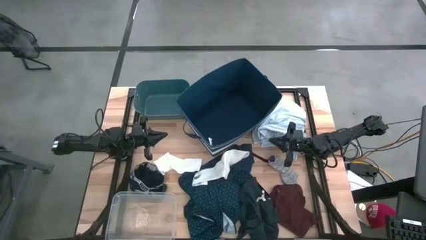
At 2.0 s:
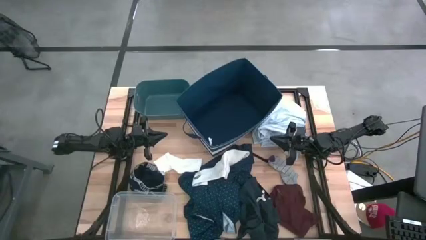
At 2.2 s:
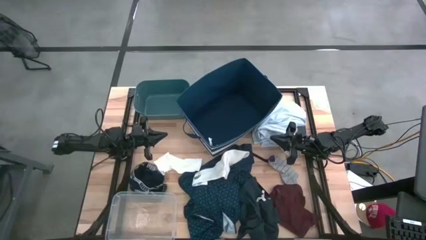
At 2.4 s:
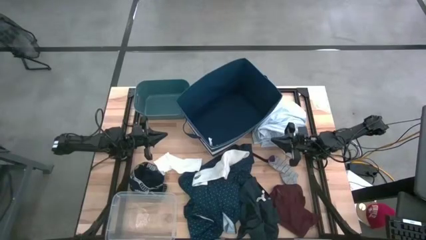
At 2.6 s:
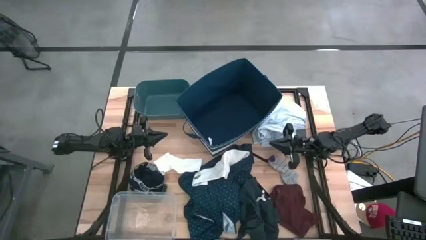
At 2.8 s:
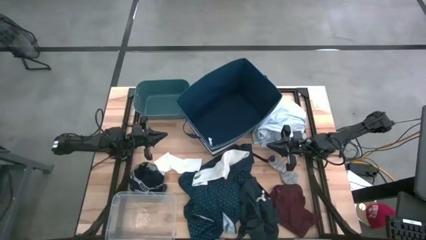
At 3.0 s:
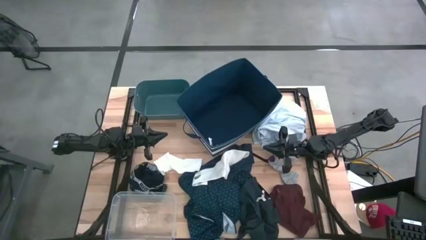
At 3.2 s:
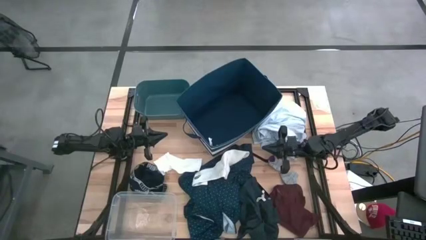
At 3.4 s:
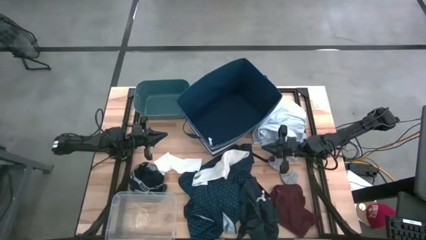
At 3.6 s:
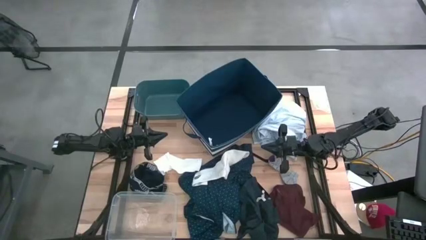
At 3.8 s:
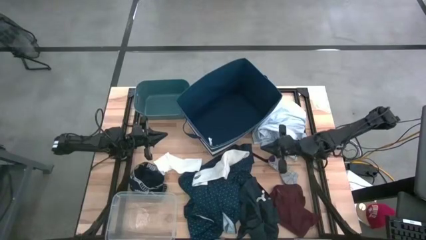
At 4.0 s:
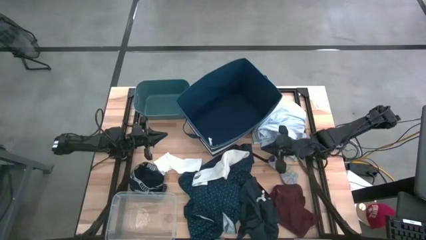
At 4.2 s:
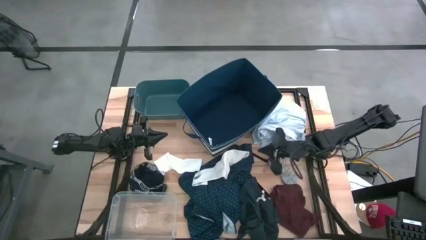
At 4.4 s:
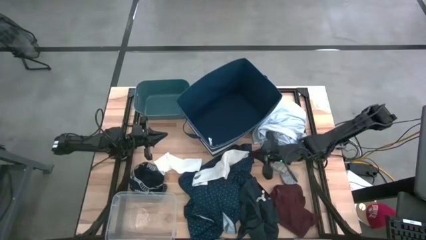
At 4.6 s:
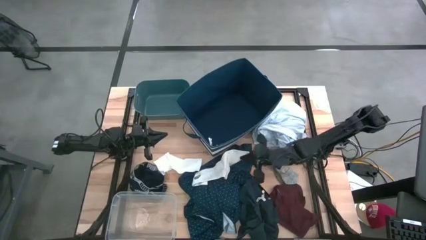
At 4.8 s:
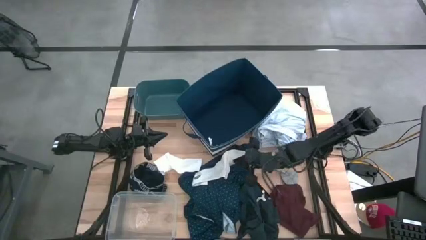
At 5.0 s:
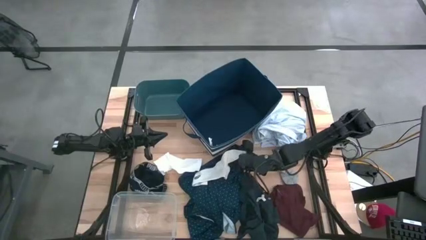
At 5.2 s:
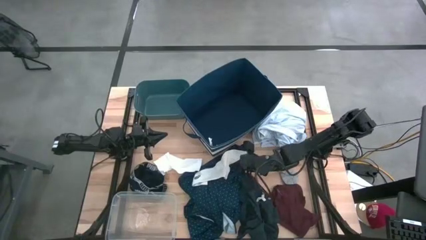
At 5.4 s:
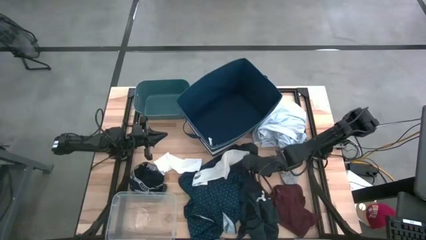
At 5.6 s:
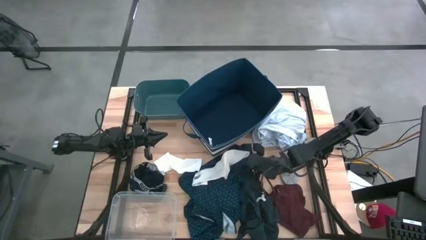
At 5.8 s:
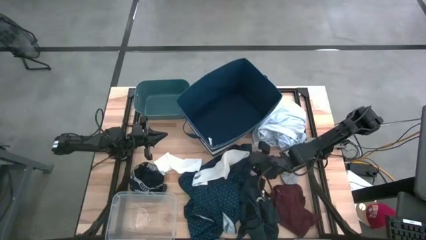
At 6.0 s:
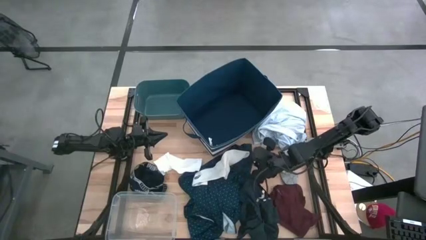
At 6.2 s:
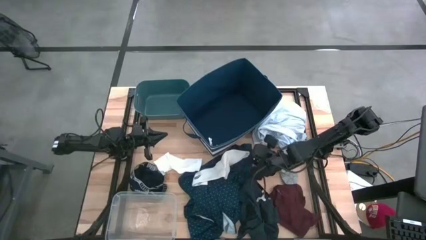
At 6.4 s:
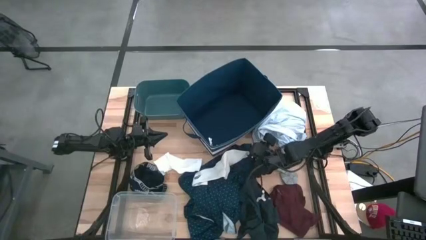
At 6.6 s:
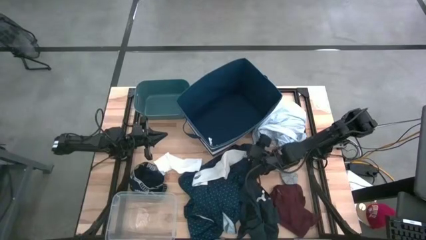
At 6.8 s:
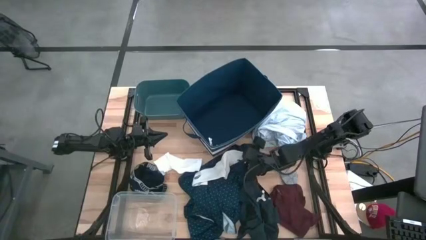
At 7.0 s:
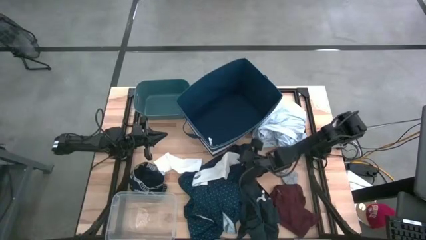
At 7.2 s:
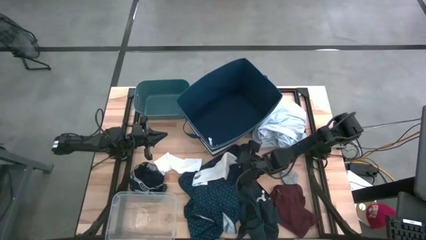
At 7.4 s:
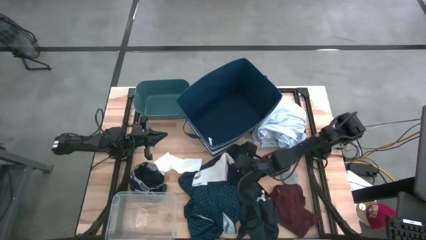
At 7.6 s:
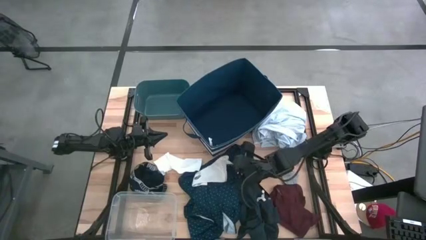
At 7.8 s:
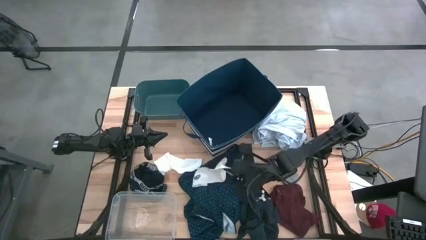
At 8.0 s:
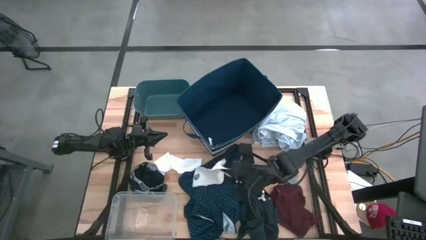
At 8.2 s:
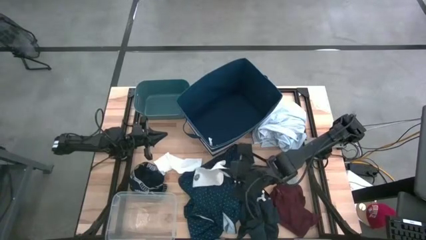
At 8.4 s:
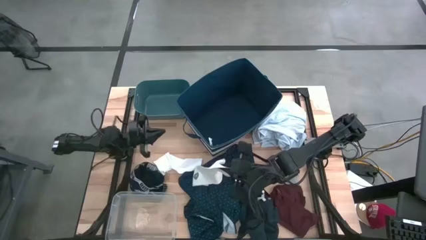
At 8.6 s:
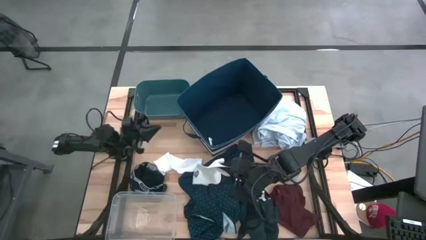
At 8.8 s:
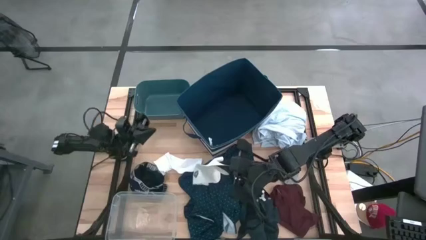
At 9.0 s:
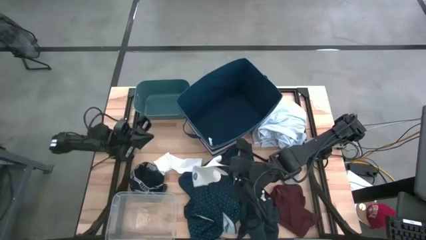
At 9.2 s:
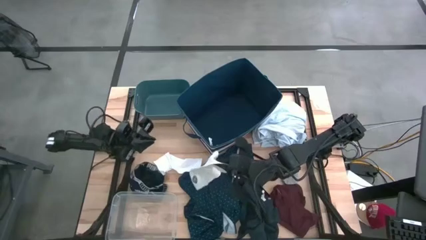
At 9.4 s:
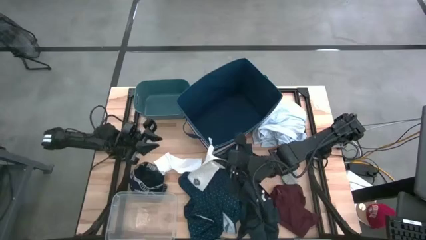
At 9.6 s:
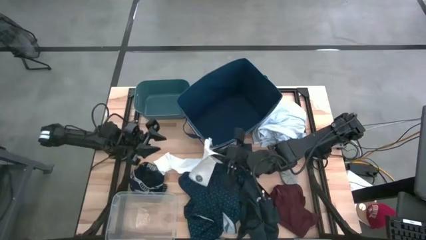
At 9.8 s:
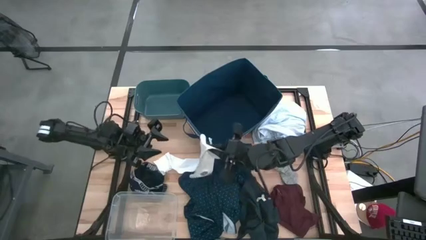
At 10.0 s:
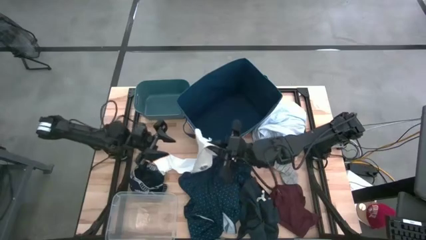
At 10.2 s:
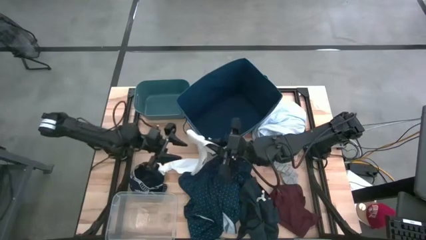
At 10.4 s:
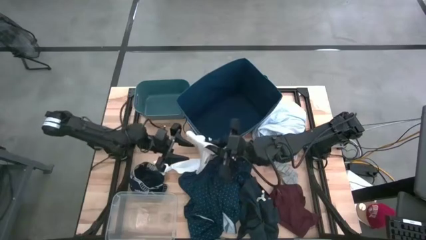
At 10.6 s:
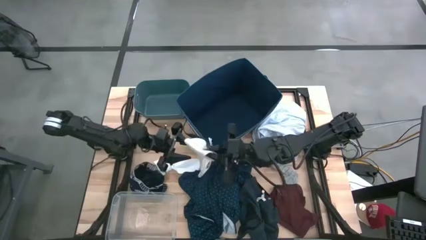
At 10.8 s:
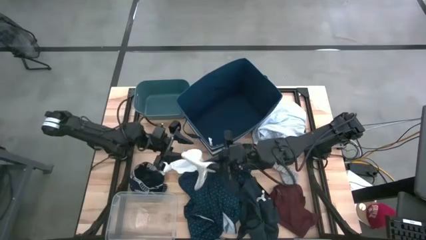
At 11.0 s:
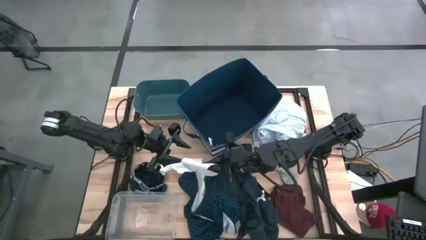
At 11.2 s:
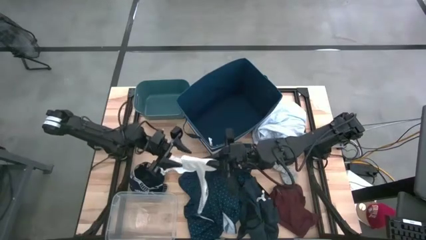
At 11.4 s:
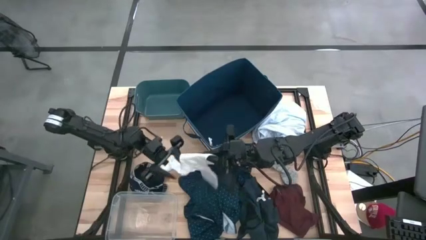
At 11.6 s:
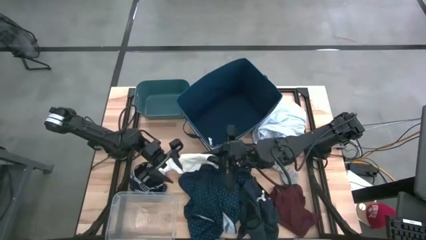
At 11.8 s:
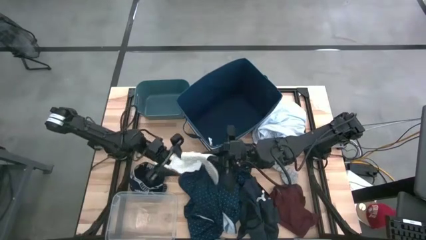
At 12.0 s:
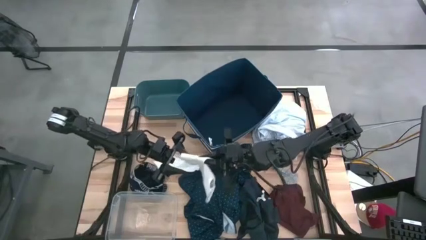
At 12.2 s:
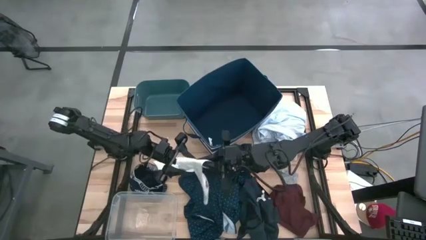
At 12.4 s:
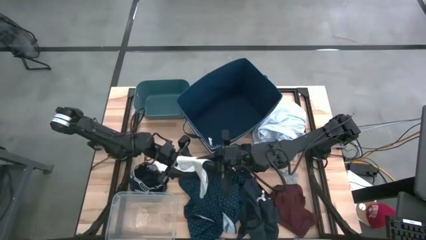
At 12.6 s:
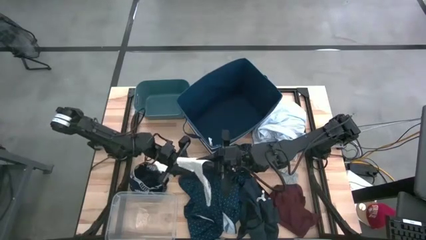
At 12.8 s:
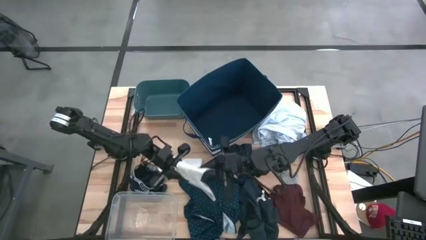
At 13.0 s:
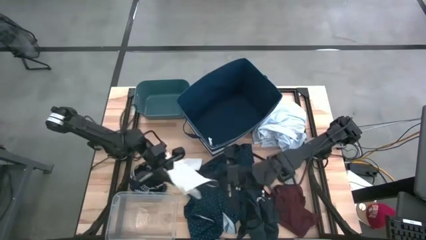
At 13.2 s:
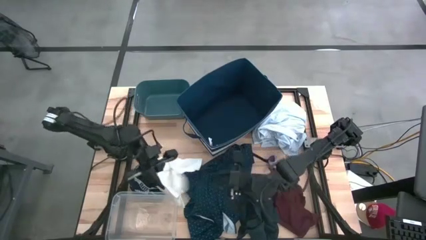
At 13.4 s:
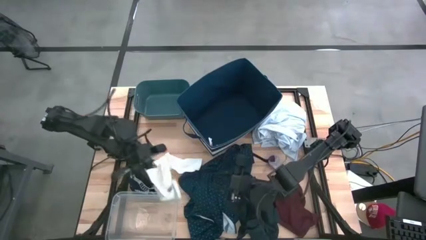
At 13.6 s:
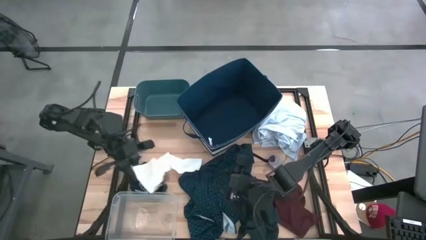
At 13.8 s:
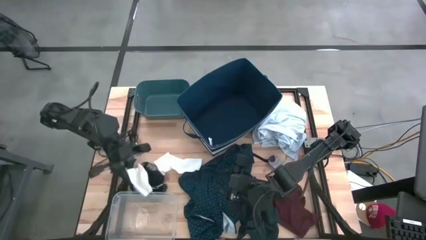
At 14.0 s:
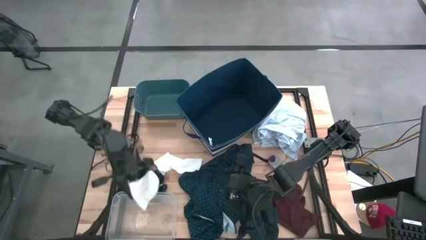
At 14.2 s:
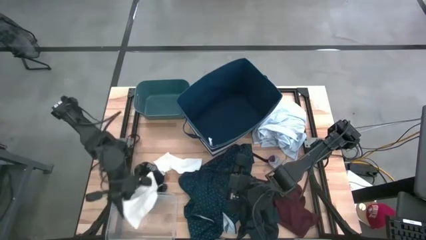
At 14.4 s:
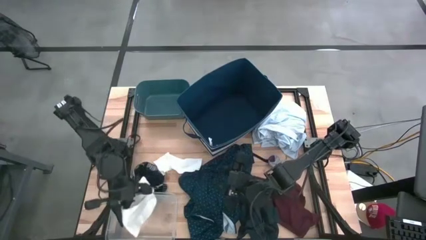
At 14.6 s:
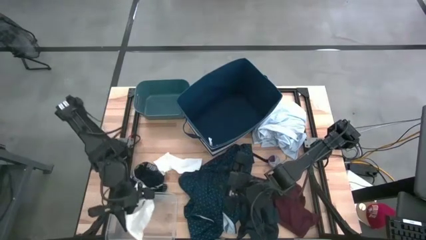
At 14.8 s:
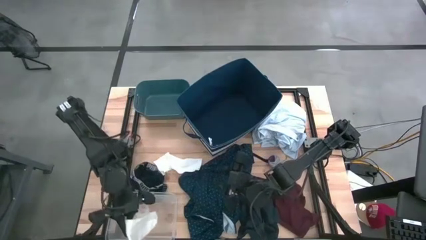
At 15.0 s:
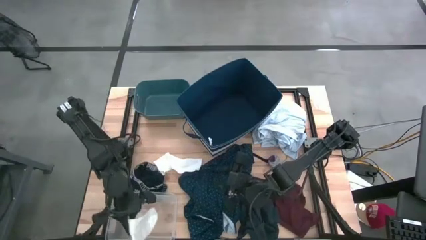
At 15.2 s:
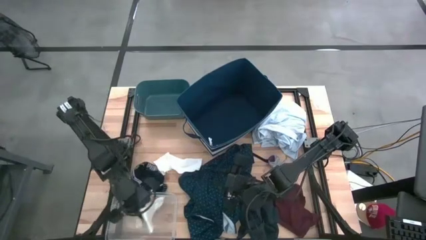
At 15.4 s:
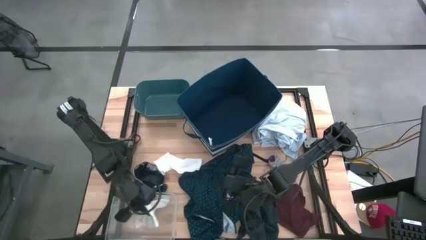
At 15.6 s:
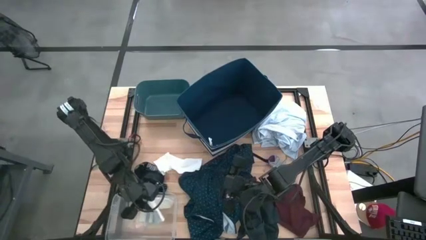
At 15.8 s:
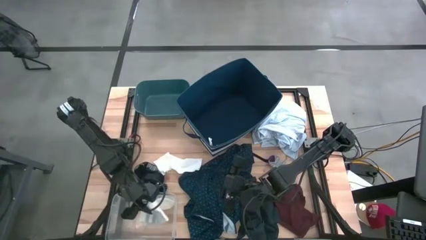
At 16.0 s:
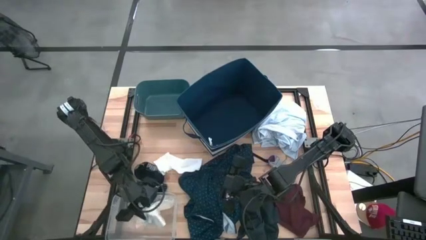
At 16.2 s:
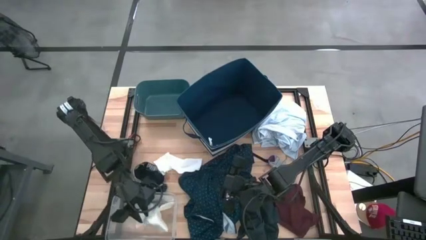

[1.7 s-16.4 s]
Task: Pick & Place Cloths
Put the right white sock into the transparent bin

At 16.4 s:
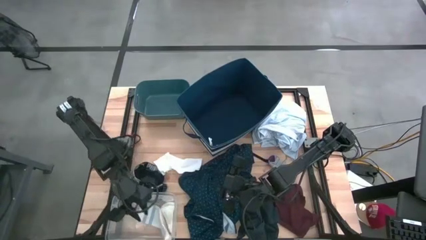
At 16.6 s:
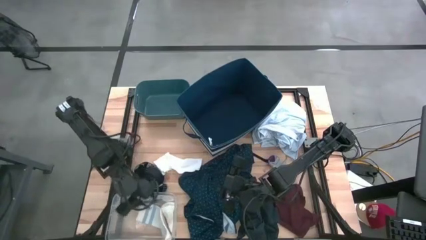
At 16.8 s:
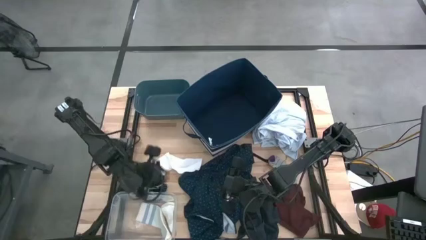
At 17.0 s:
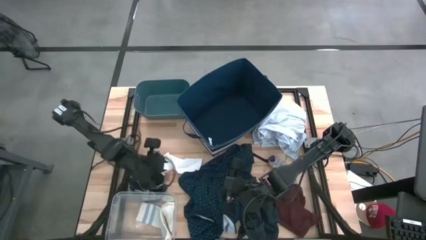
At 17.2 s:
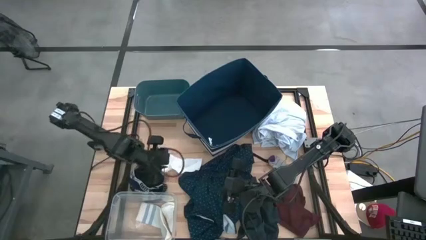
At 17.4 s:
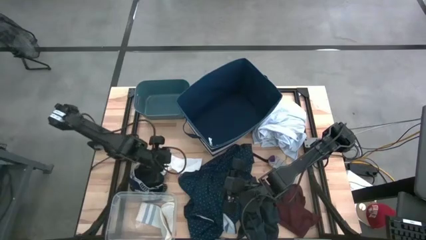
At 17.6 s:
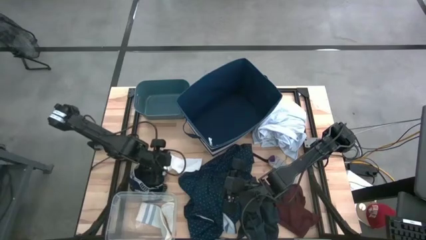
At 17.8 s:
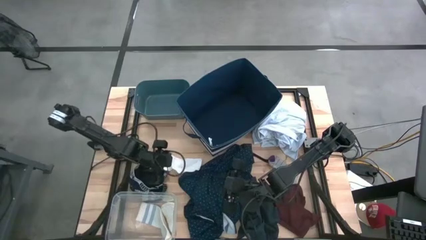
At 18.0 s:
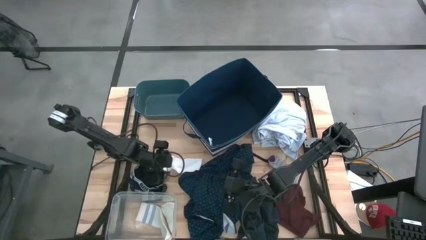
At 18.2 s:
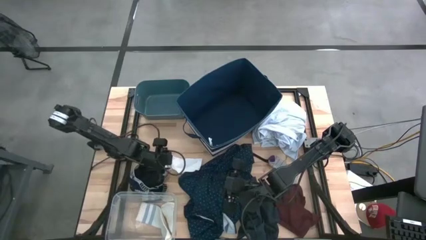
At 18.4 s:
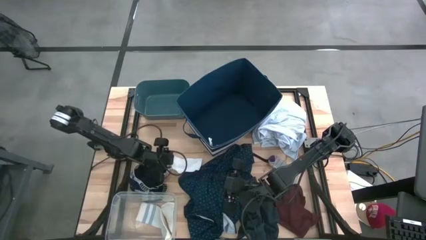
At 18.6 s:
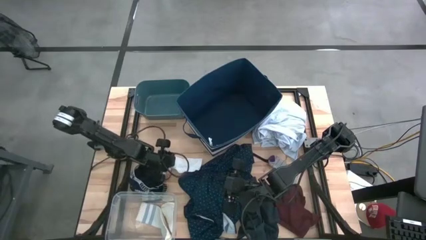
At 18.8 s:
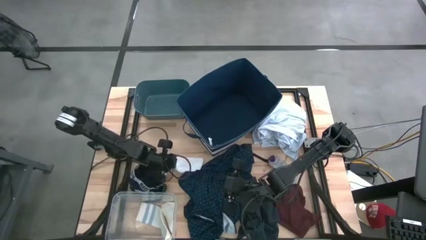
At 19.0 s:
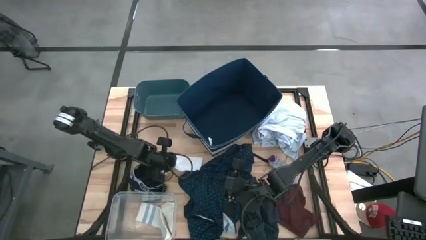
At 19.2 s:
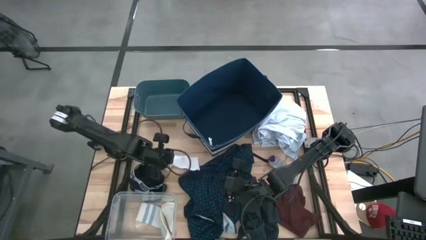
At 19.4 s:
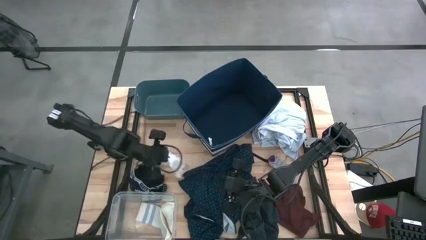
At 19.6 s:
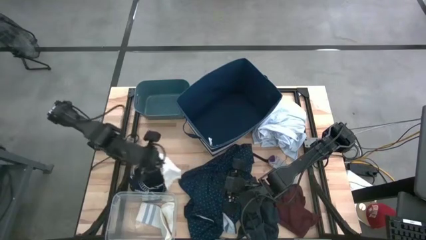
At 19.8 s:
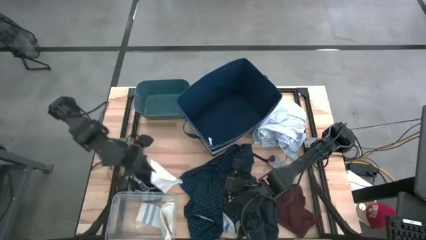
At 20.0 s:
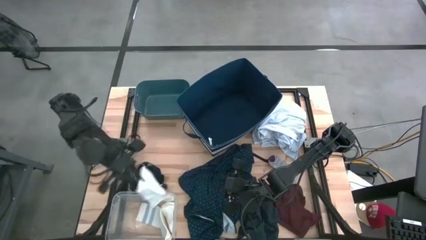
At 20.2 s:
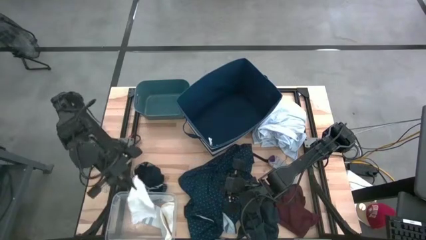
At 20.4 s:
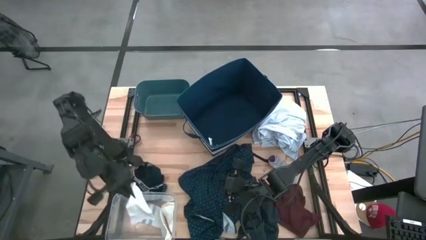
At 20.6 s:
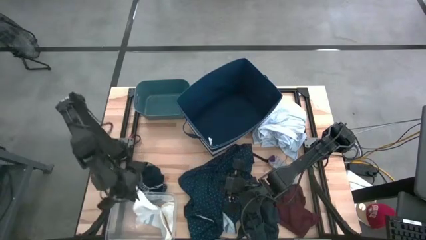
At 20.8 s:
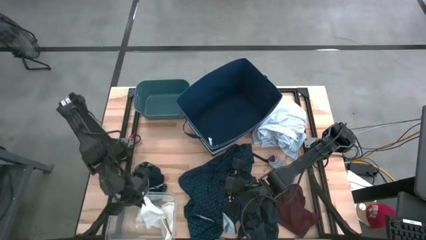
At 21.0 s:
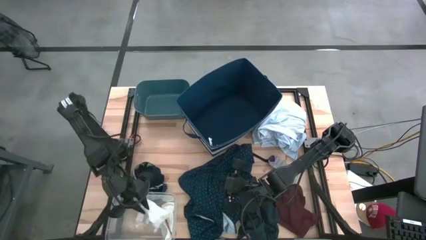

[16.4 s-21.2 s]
Put the white sock into the transparent bin
